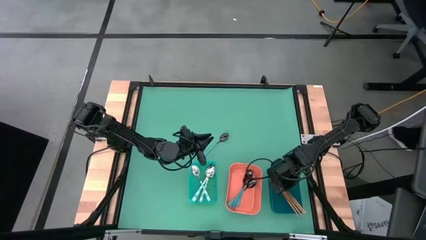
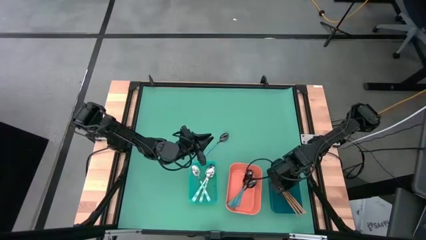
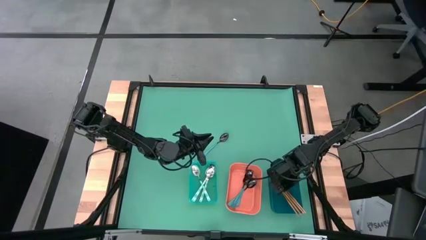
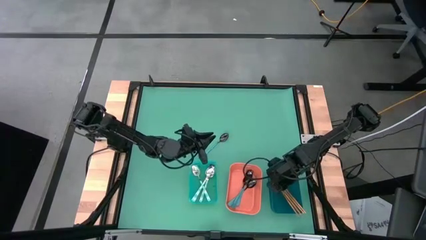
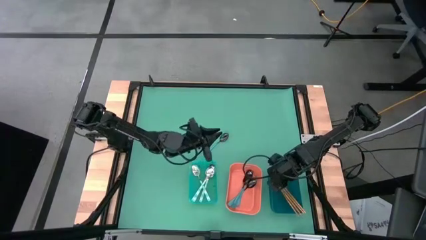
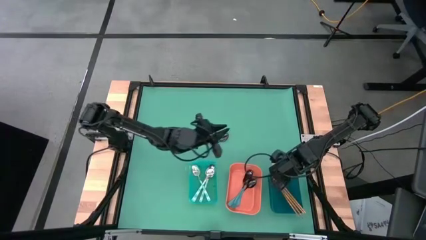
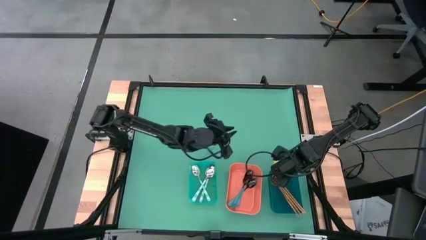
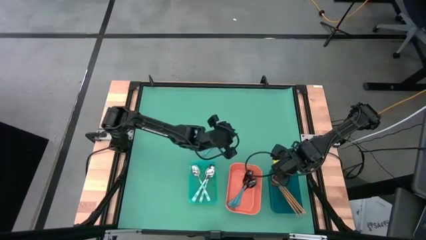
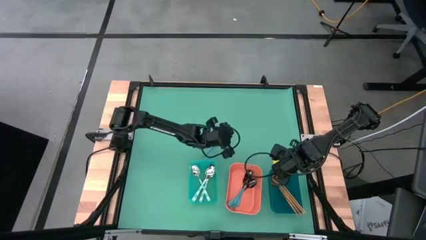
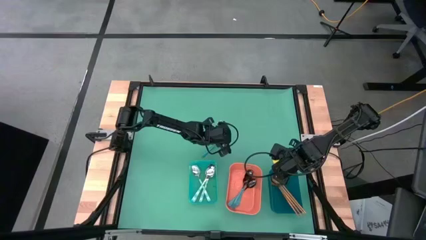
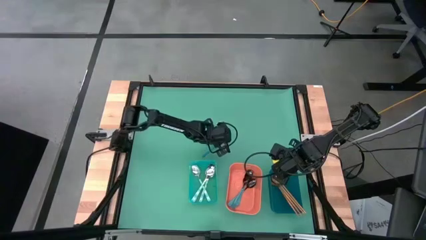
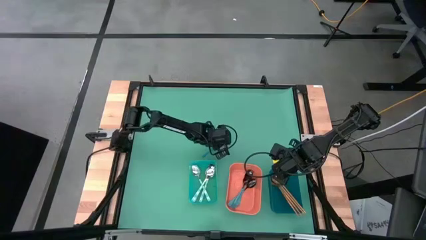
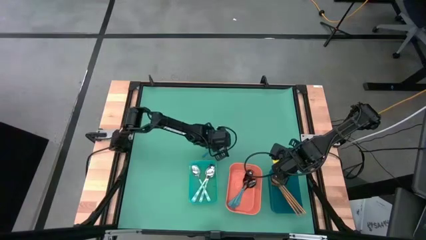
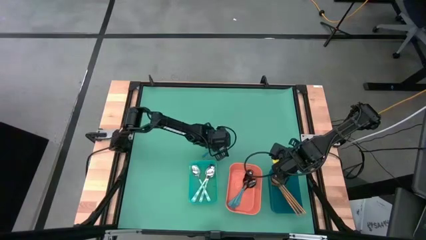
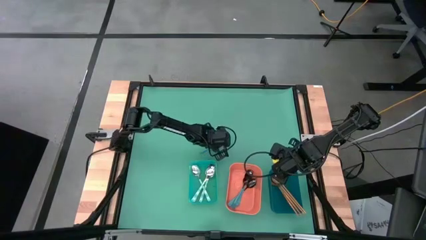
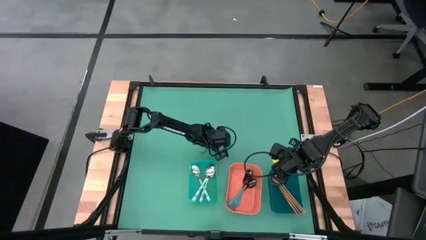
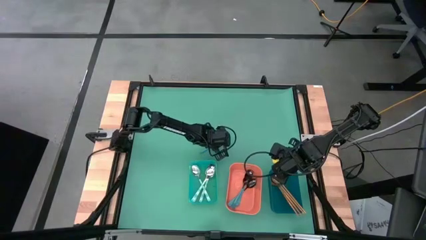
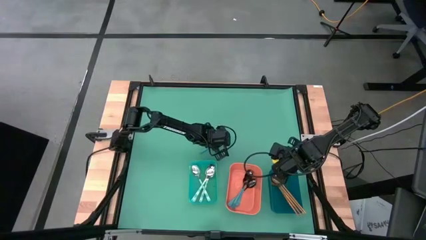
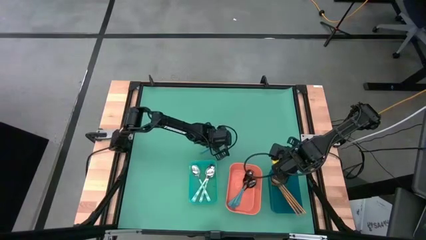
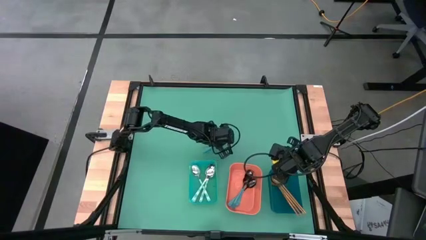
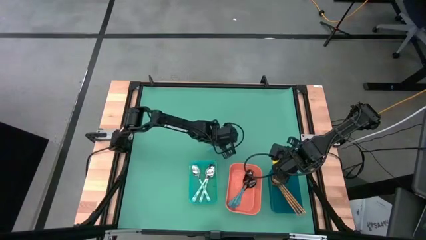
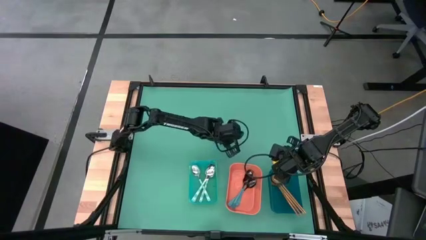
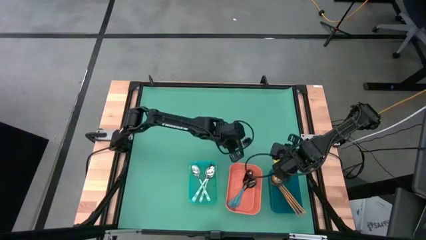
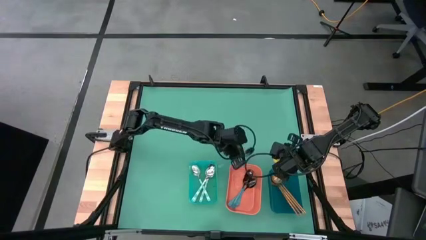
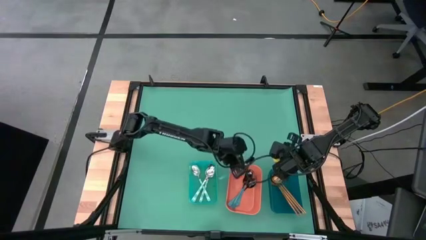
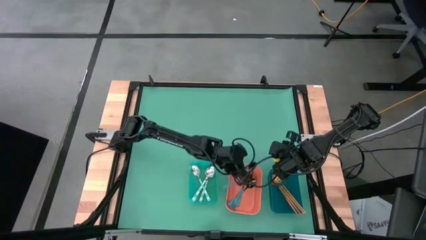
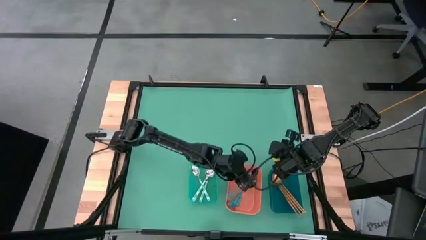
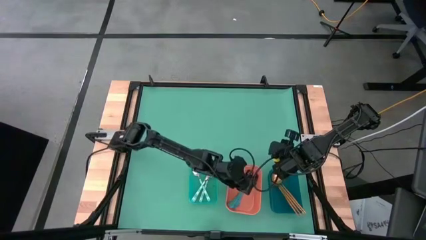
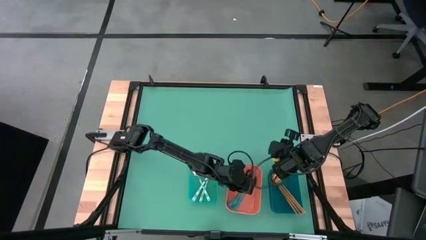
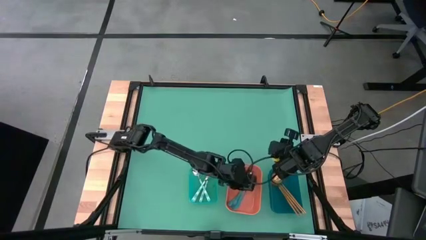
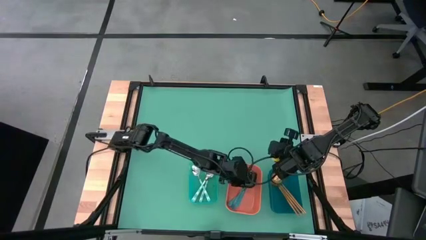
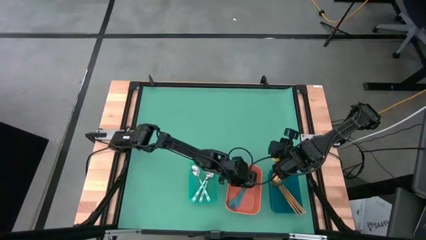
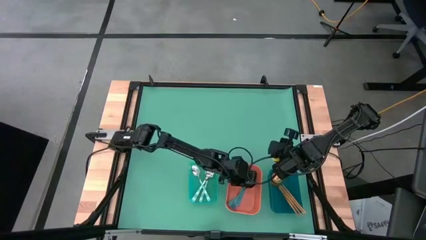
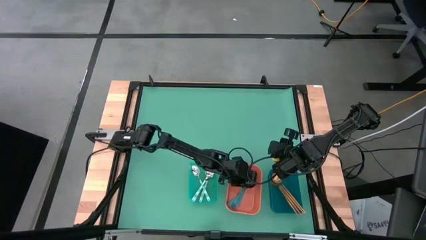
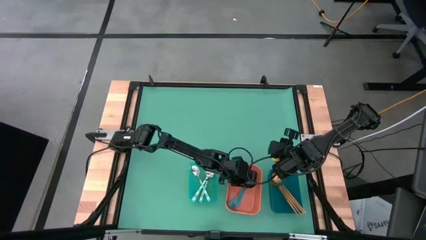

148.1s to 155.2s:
Task: Sort silverware by color (type)
Put the blue spoon into the orange bin

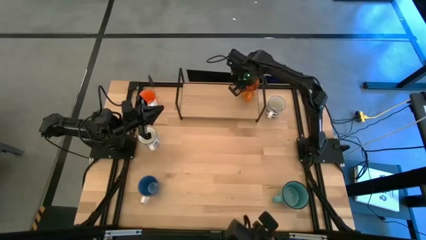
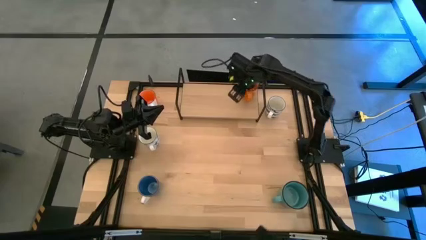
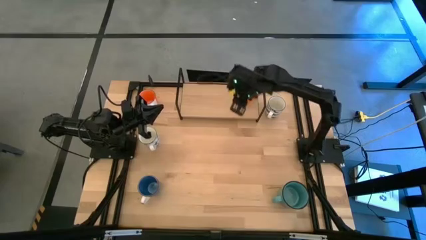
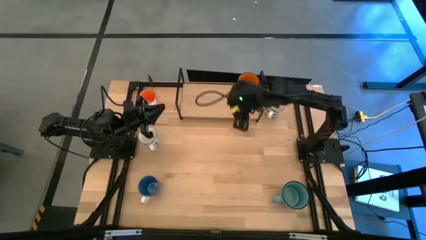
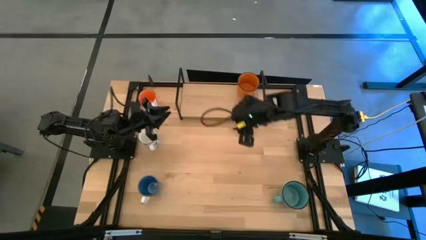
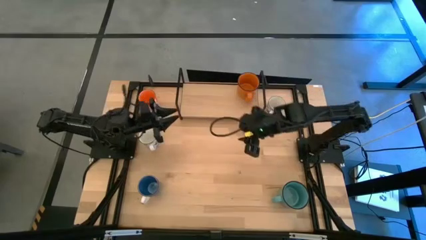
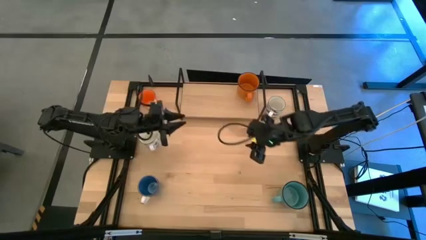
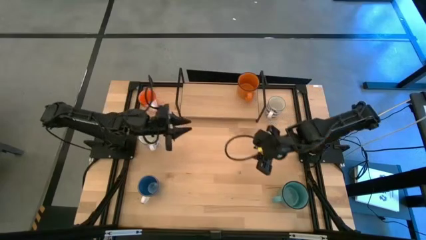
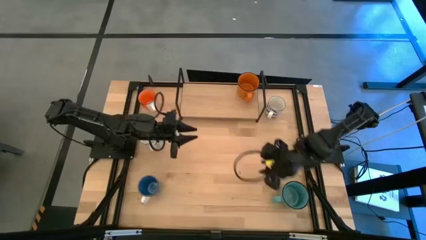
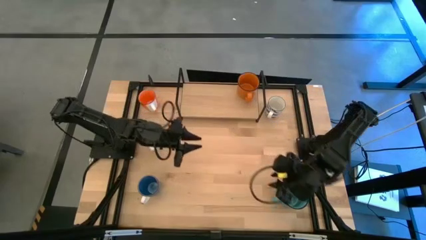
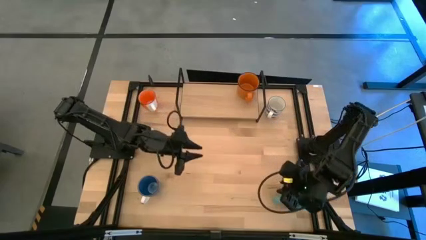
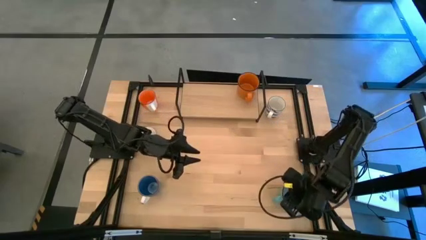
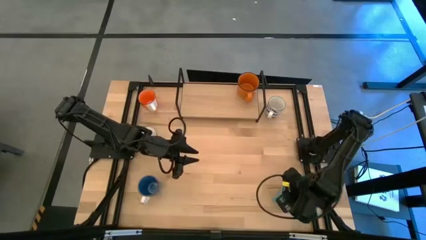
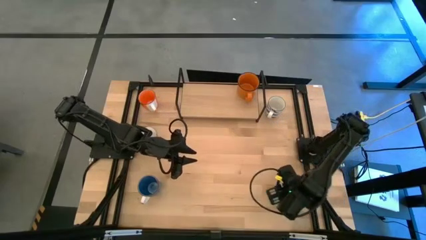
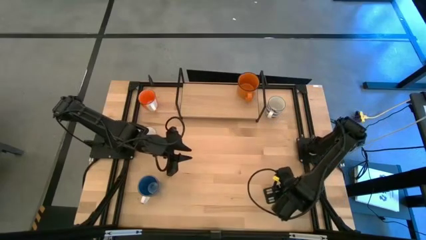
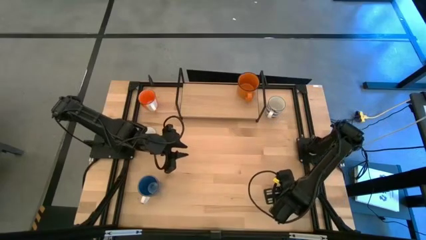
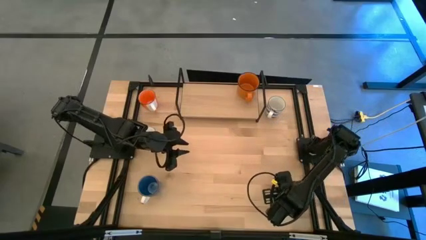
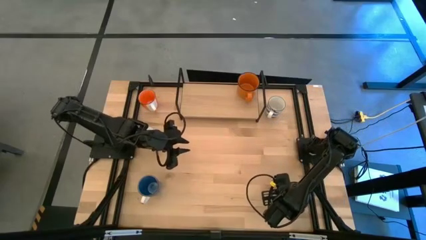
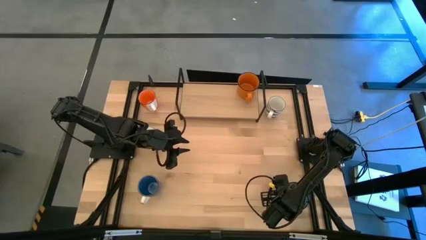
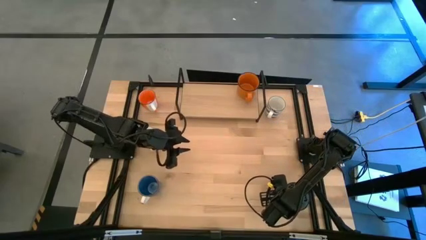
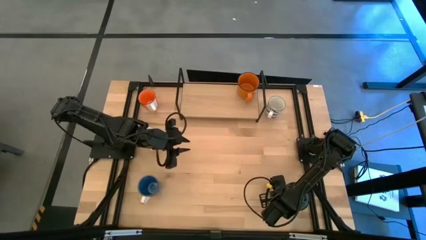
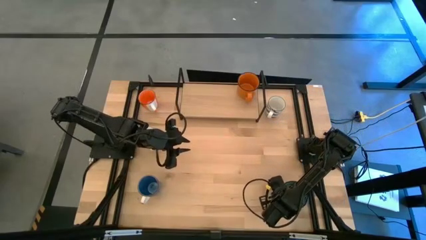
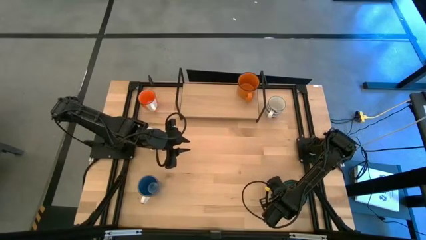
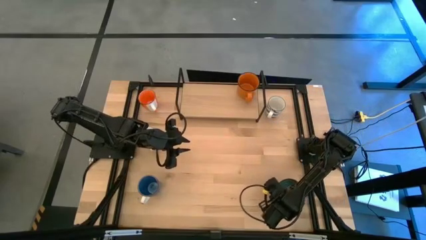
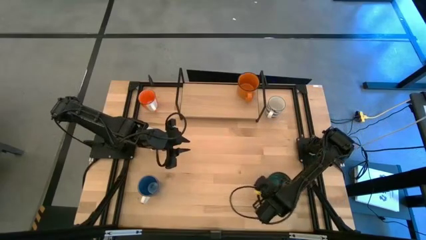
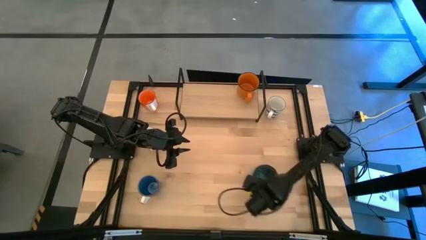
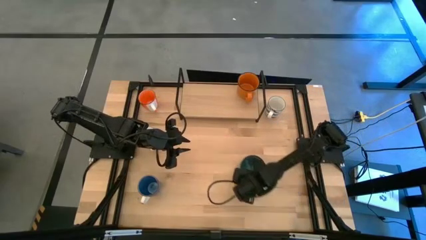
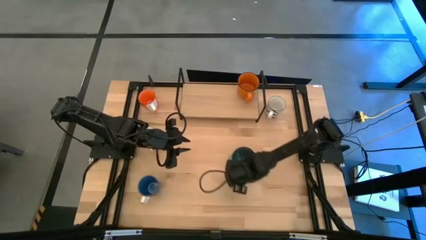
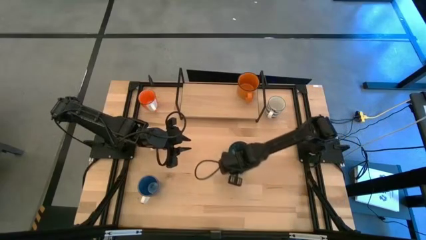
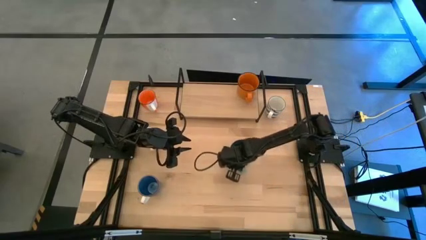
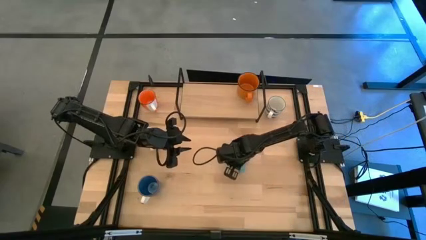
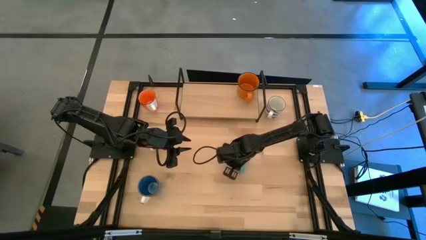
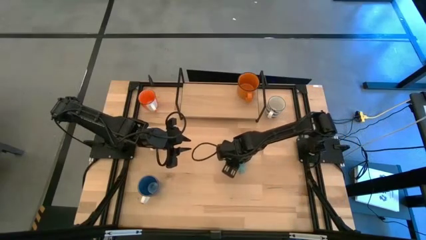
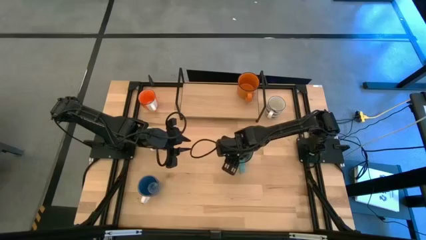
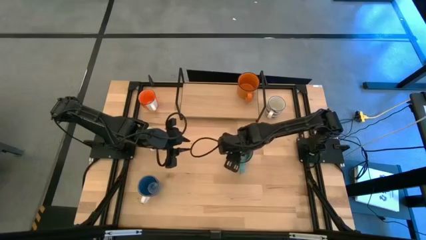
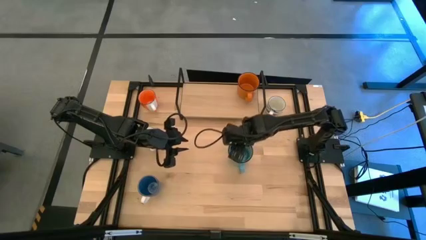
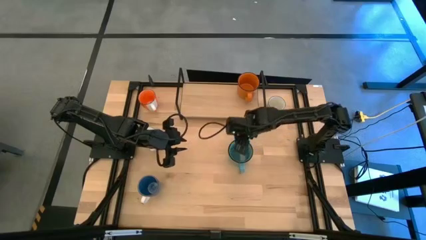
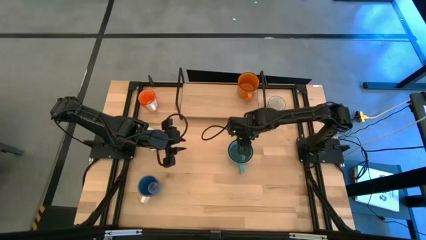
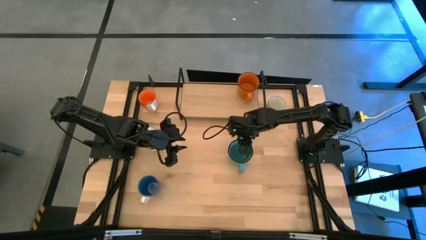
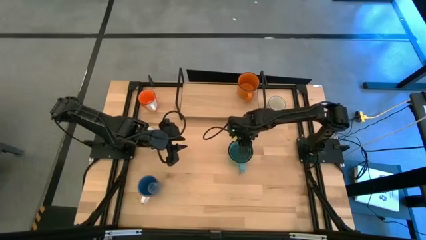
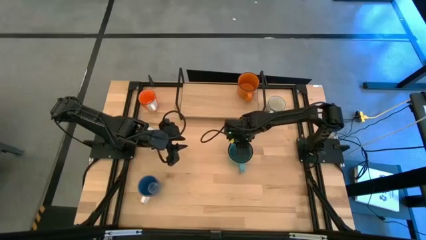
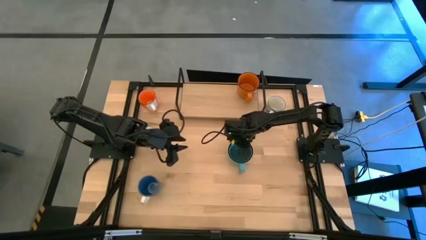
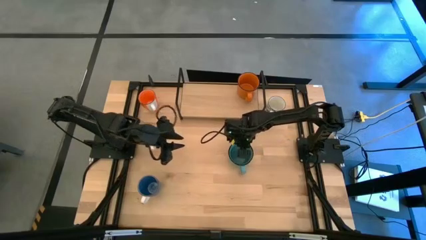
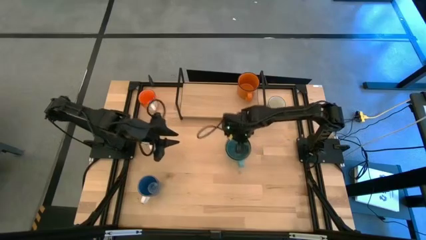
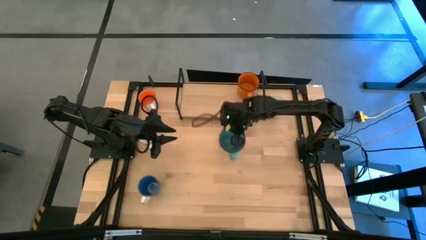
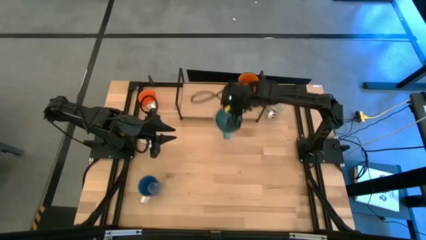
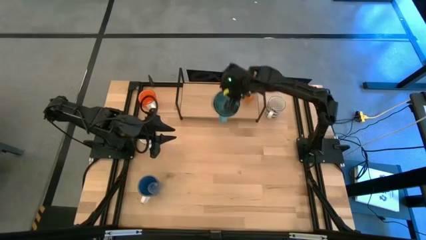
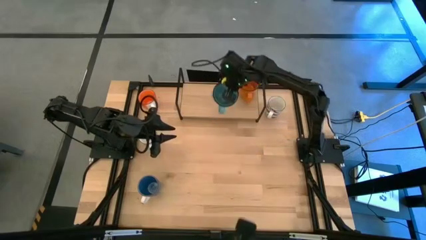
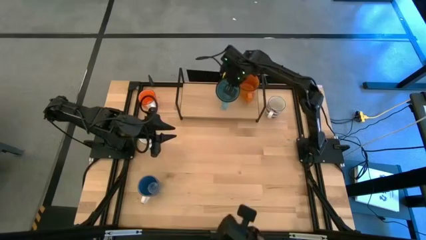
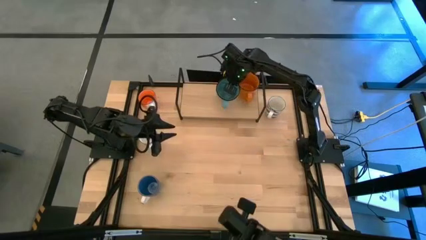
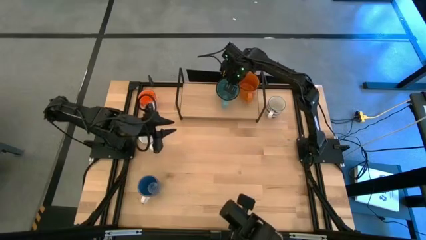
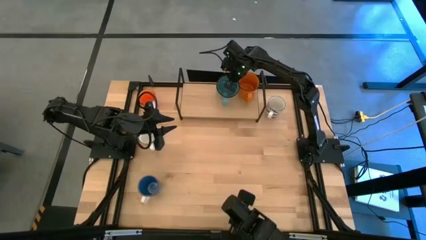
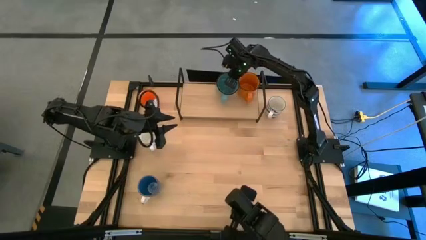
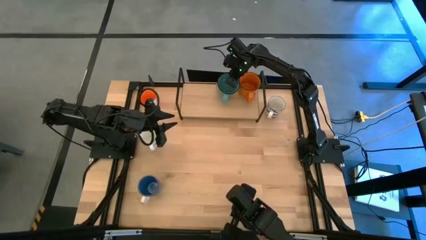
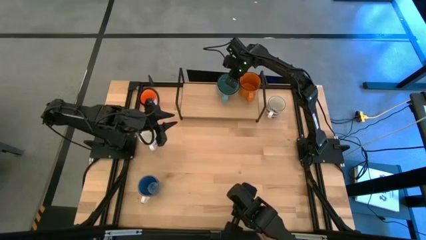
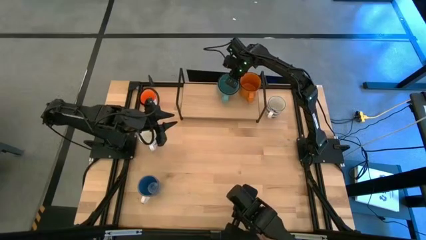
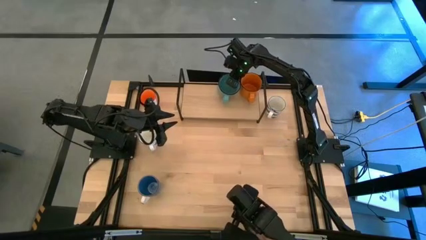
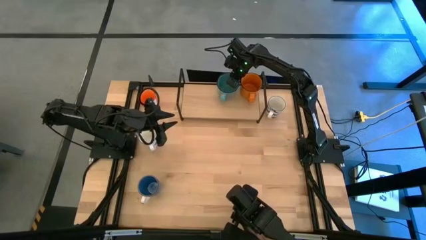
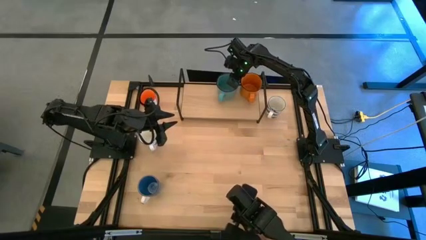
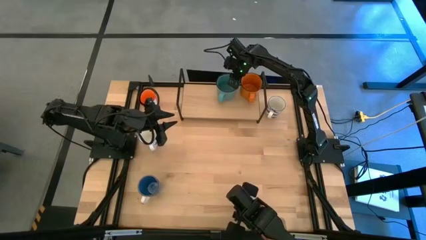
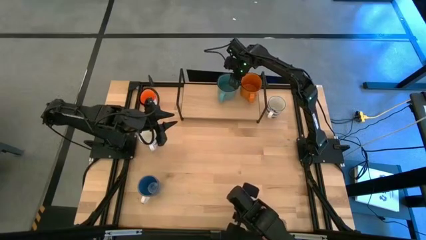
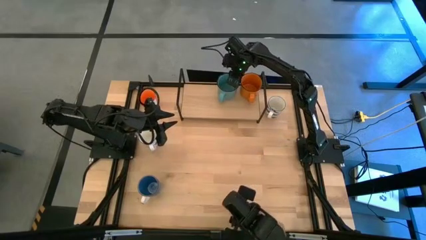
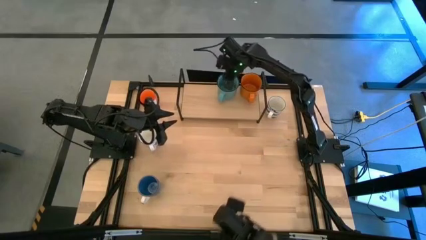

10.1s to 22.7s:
Task: Place coffee mugs
Put the green mug on the shelf
